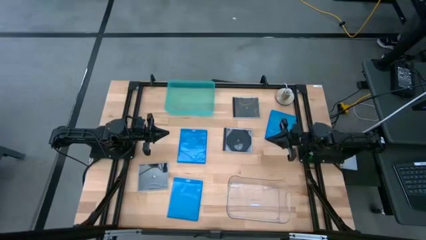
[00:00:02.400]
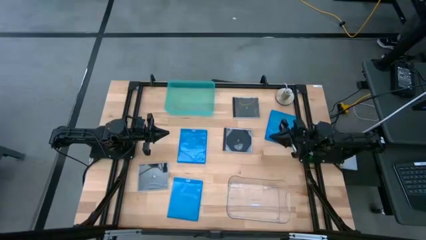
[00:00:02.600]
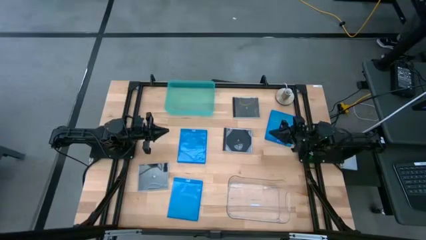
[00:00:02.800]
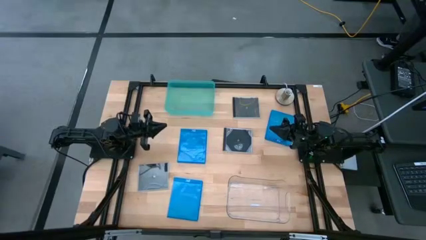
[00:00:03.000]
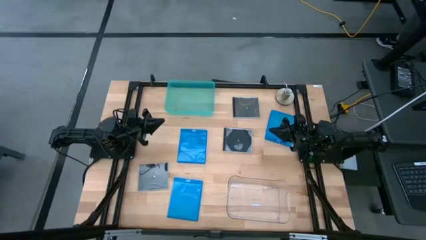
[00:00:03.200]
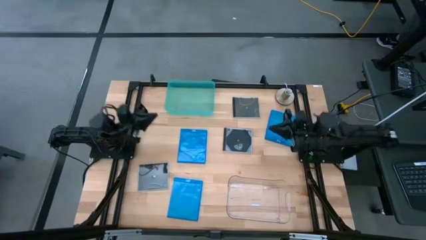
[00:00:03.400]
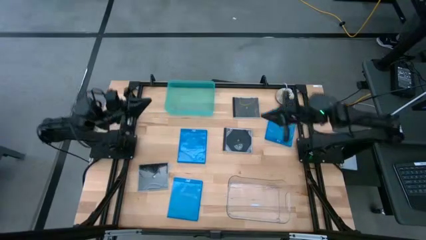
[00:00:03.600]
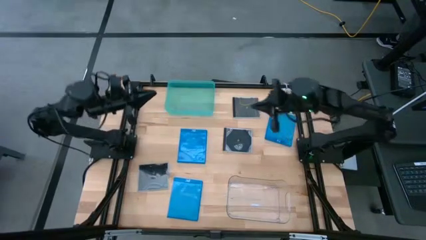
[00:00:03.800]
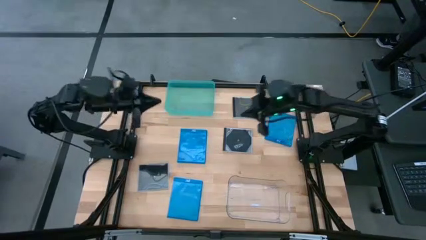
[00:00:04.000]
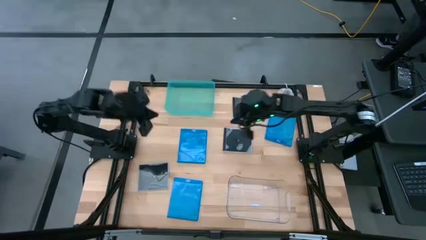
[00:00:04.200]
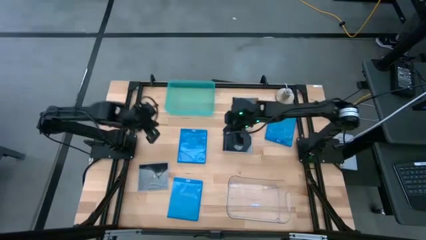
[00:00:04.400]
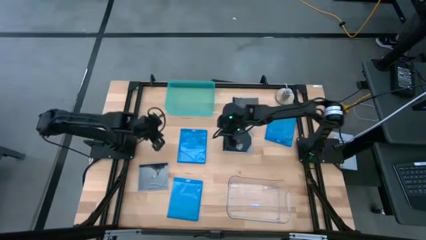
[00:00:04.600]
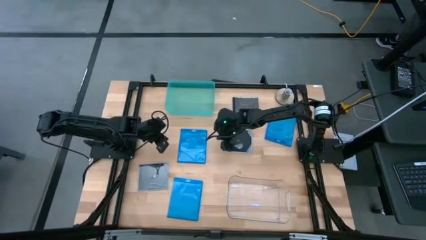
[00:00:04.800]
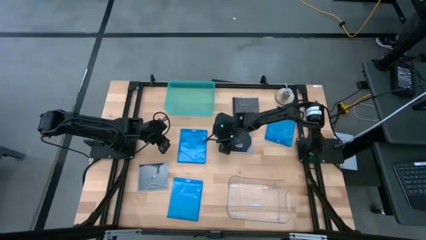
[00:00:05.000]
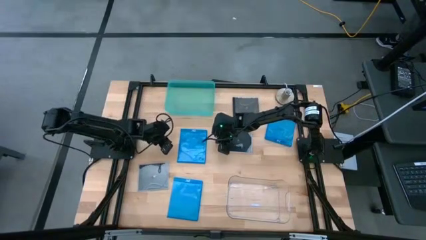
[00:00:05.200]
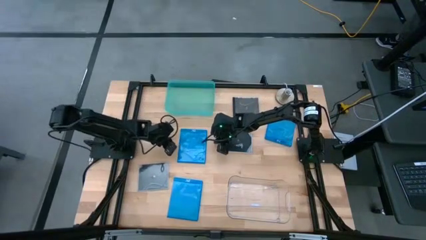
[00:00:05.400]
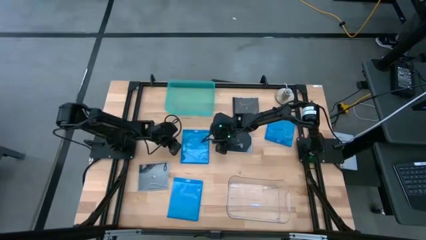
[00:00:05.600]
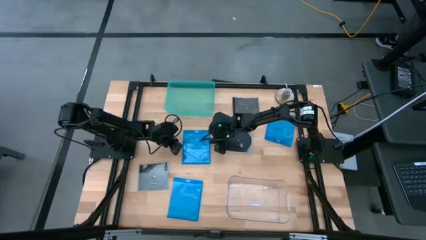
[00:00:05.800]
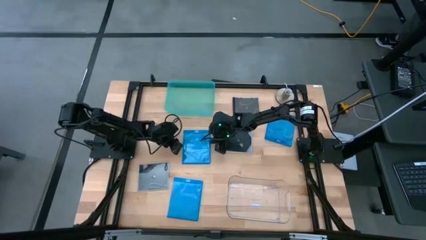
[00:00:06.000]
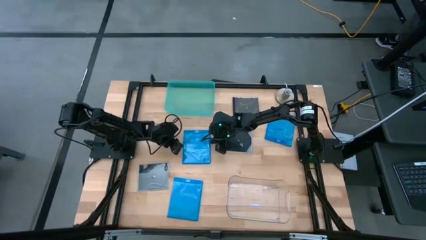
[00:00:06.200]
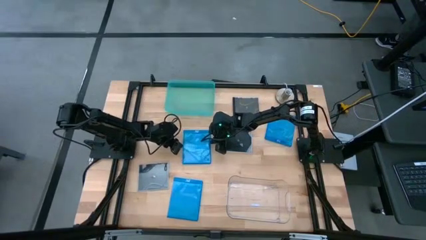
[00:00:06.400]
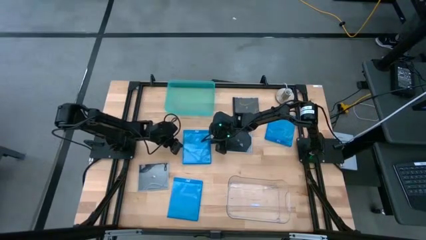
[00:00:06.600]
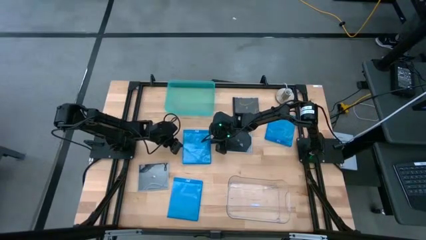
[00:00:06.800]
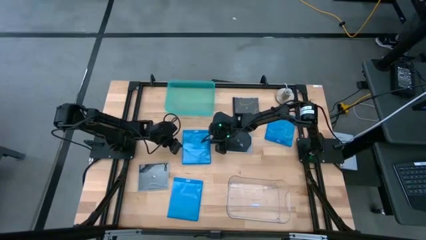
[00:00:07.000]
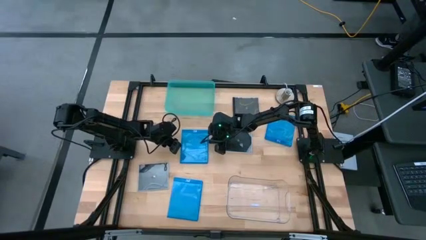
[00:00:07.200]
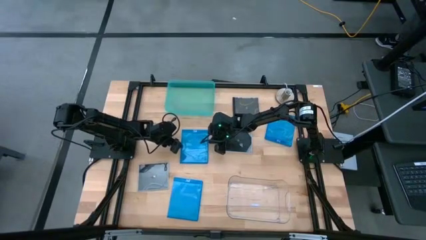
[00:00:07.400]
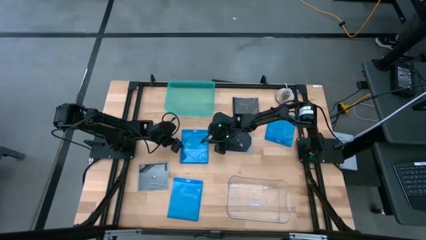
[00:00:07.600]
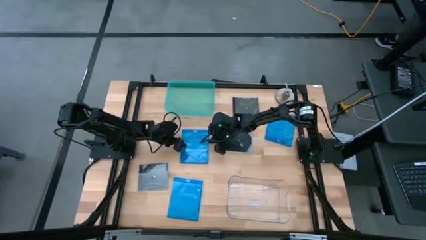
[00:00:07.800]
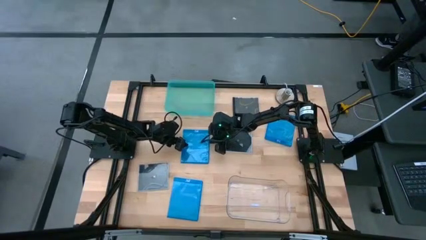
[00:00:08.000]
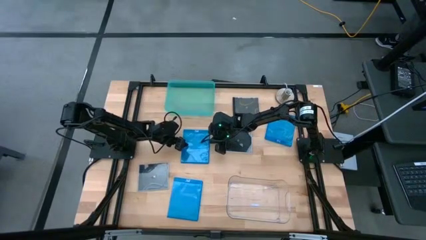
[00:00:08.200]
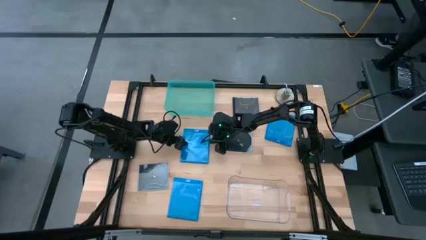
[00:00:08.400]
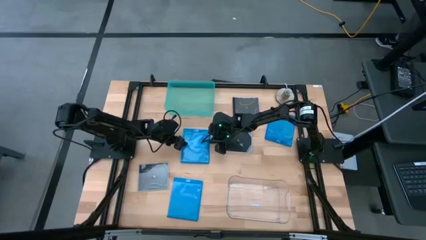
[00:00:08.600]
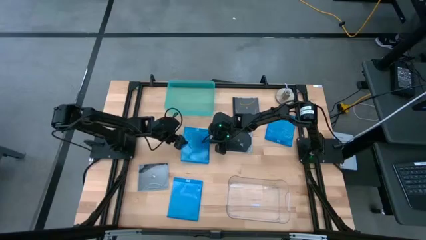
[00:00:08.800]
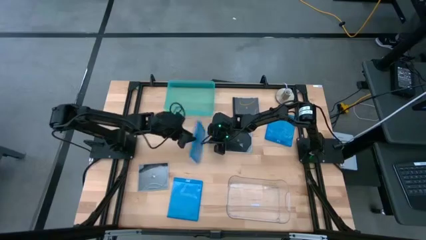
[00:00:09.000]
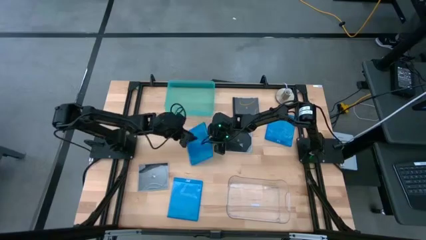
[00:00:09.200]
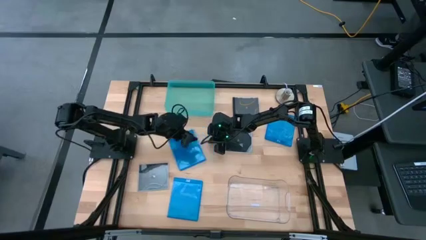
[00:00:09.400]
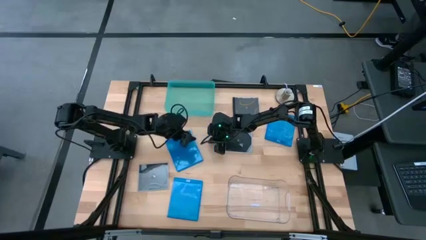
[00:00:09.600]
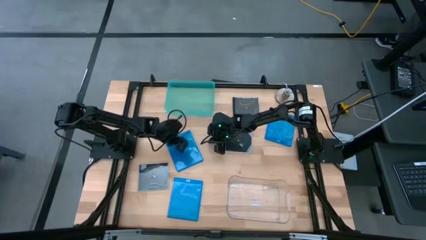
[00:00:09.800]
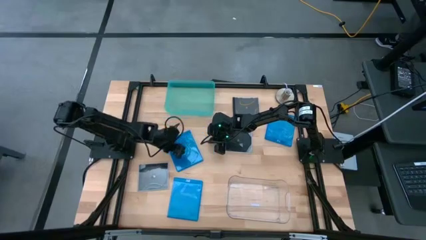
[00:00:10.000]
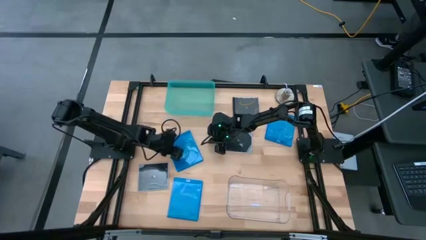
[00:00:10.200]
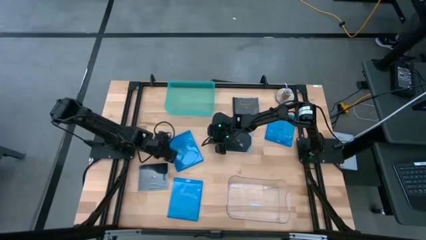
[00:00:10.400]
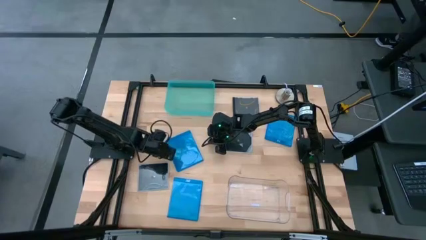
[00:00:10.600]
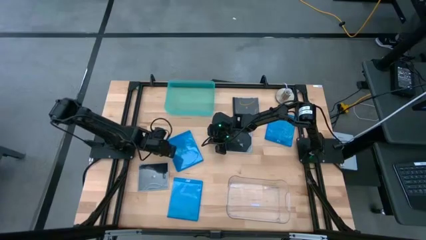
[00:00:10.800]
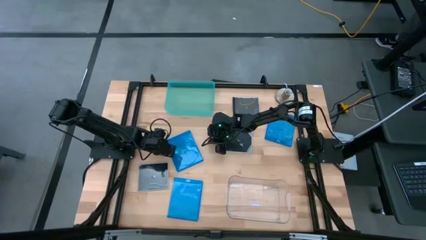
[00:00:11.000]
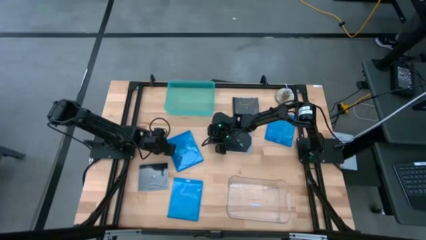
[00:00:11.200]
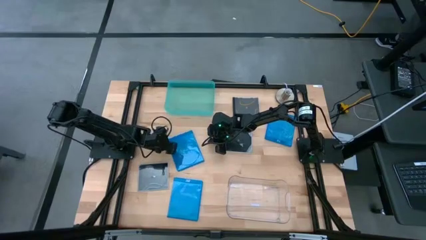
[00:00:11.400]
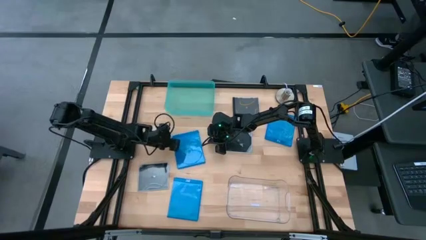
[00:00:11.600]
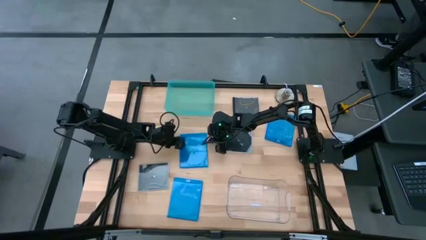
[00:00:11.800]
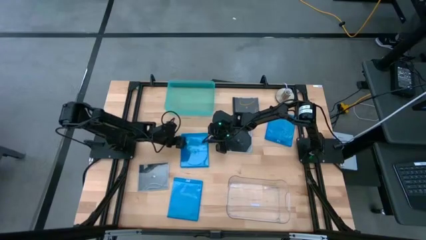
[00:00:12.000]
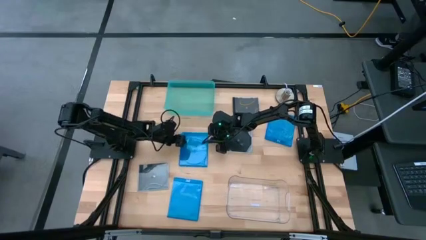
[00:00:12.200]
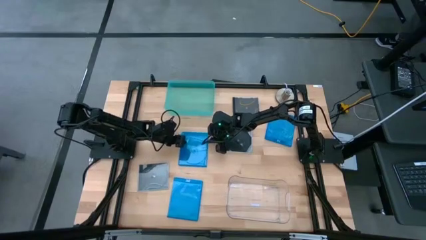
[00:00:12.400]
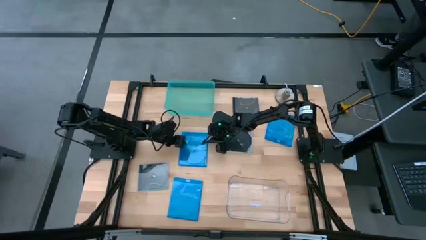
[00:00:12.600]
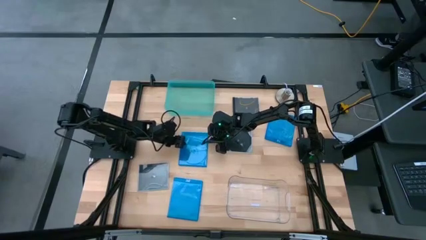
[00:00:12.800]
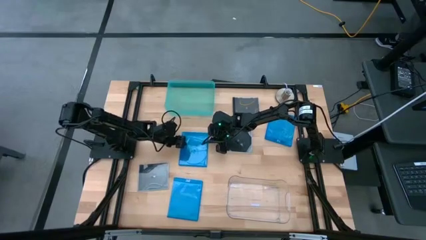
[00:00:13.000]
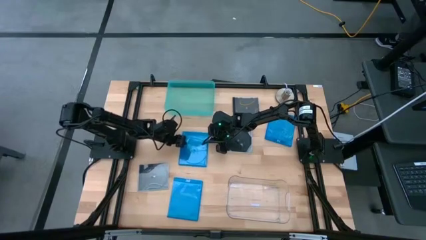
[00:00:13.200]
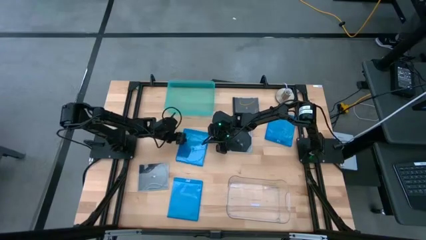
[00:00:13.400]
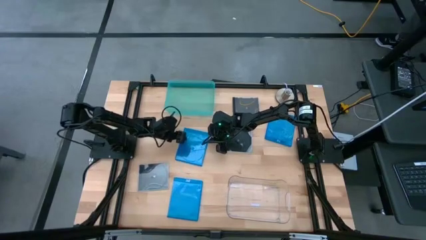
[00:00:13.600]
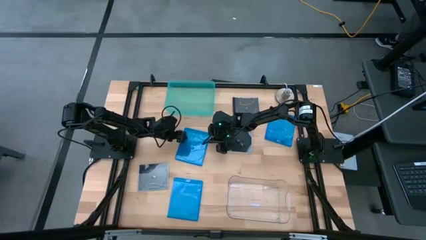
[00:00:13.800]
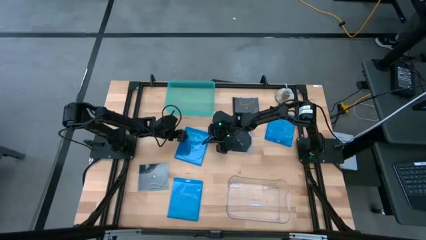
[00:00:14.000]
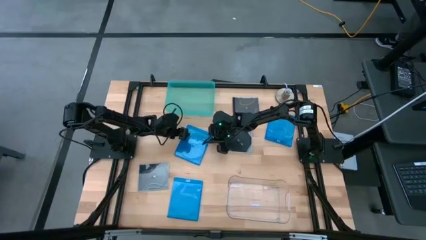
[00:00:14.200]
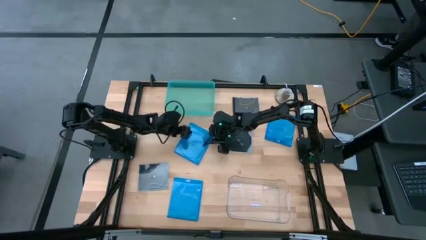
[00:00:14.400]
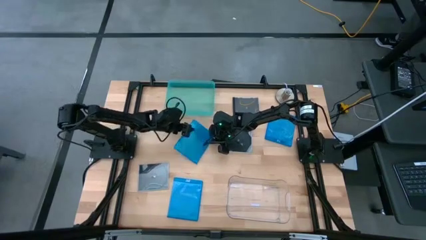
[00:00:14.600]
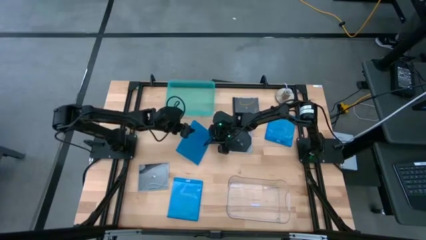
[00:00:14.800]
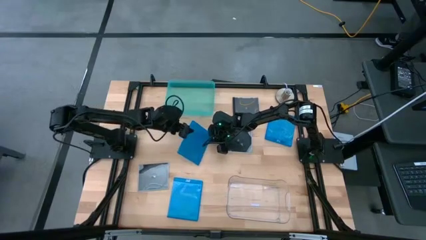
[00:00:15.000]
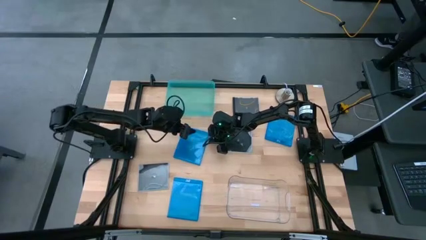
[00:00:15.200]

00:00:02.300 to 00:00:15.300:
Task: Pick & place jewel cases by type
Put the top left dark blue CD case into the light blue bin
